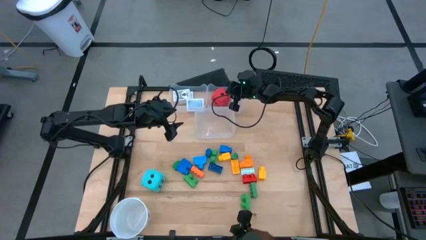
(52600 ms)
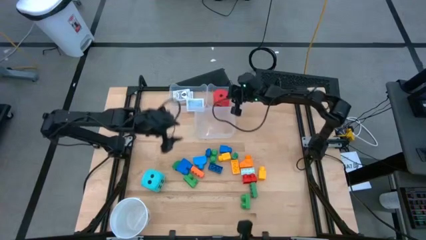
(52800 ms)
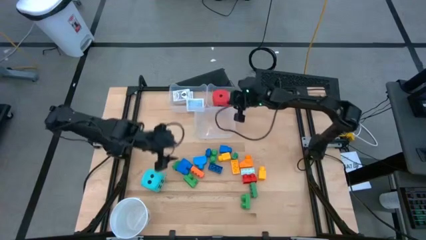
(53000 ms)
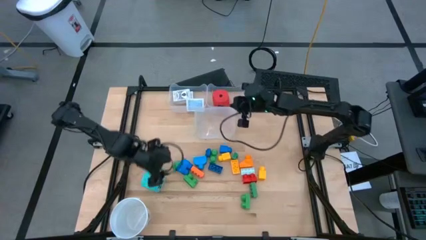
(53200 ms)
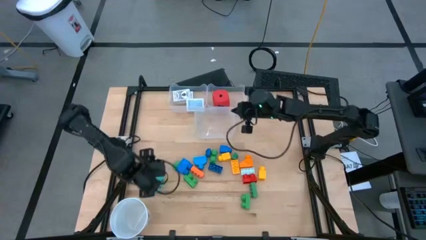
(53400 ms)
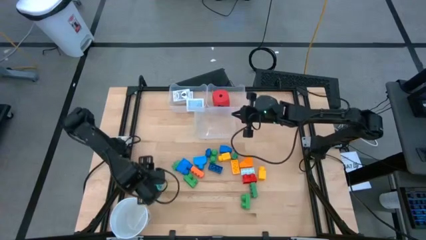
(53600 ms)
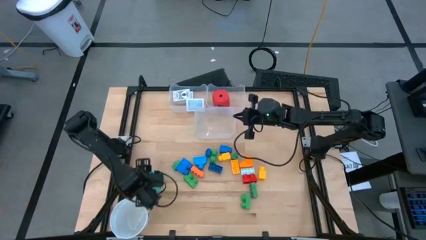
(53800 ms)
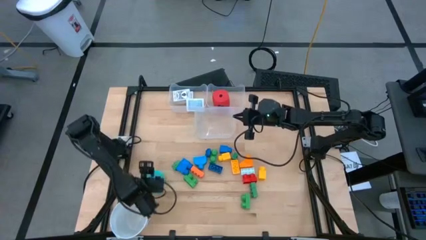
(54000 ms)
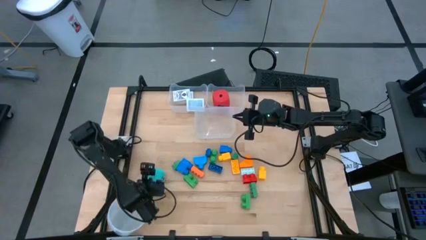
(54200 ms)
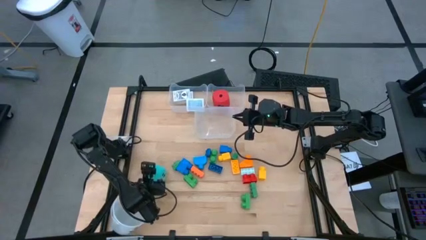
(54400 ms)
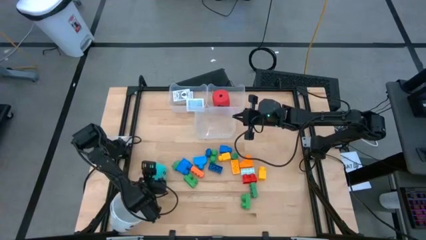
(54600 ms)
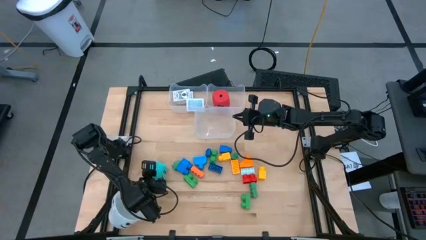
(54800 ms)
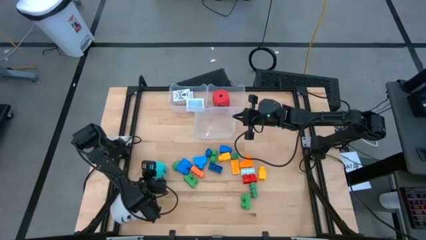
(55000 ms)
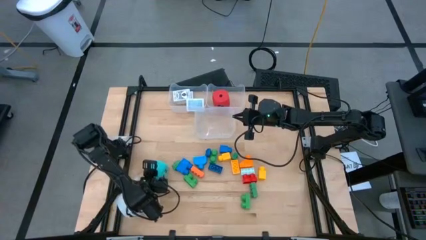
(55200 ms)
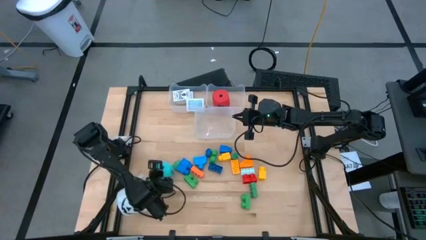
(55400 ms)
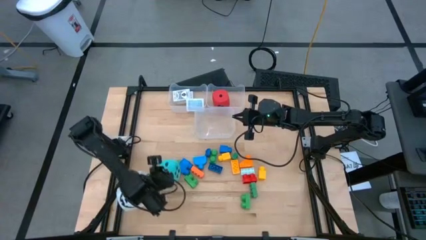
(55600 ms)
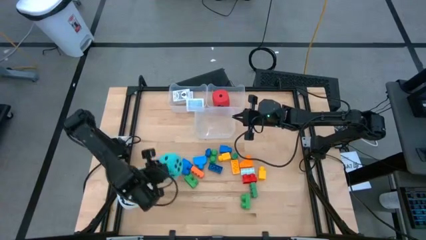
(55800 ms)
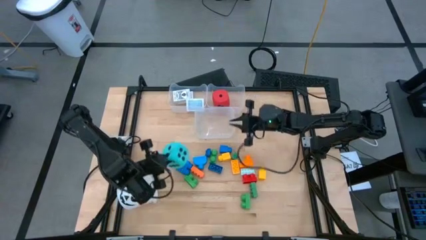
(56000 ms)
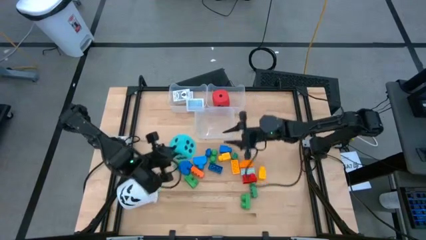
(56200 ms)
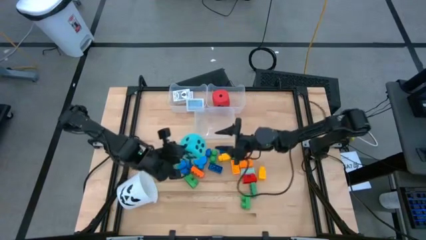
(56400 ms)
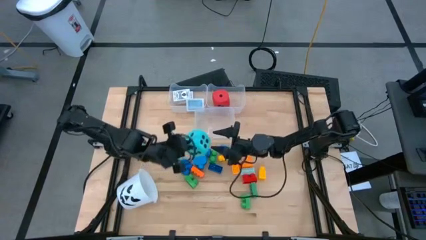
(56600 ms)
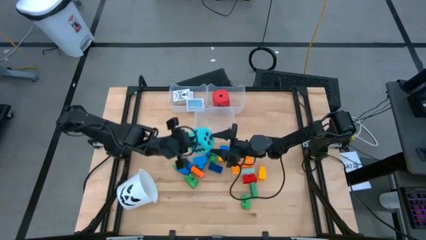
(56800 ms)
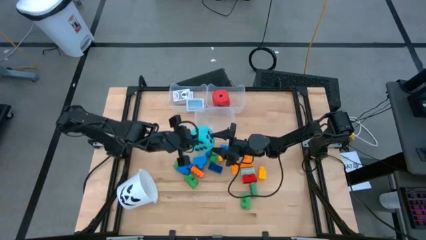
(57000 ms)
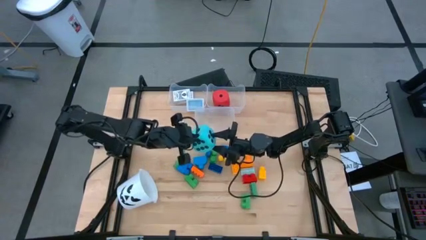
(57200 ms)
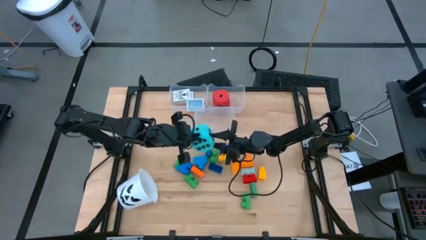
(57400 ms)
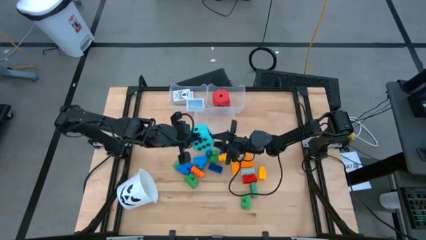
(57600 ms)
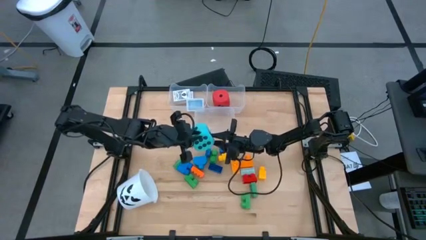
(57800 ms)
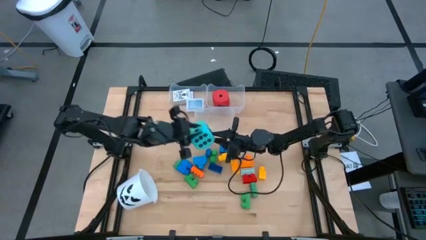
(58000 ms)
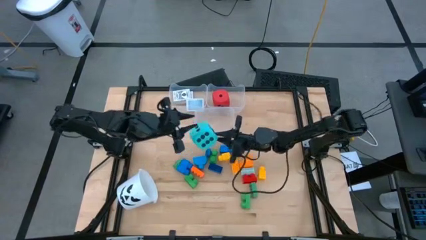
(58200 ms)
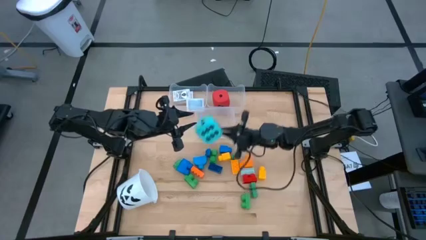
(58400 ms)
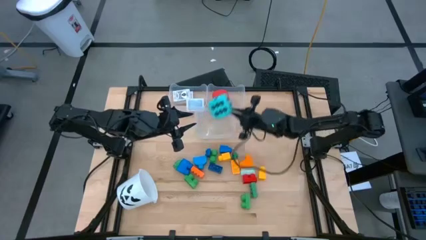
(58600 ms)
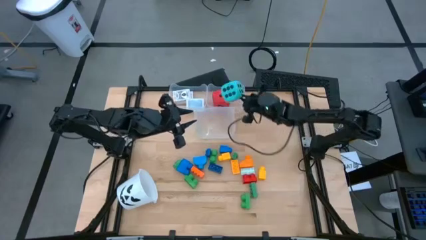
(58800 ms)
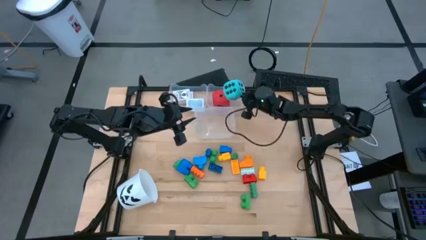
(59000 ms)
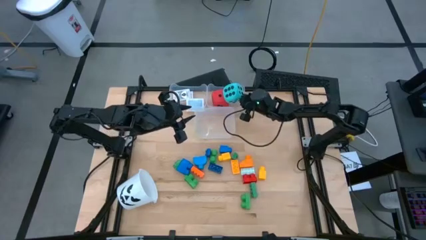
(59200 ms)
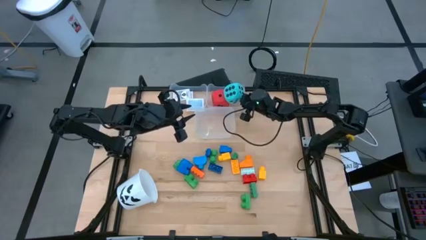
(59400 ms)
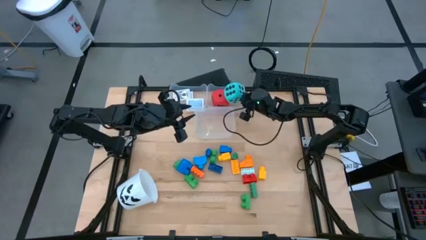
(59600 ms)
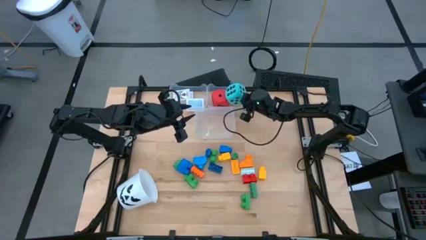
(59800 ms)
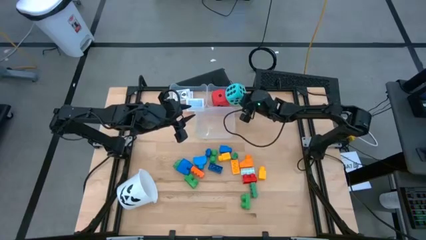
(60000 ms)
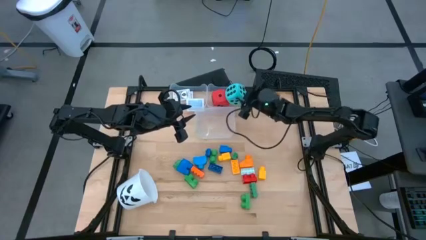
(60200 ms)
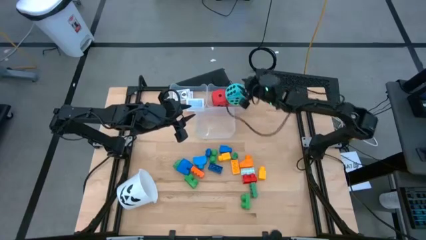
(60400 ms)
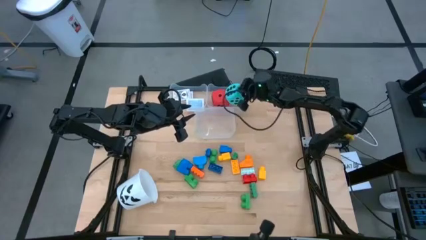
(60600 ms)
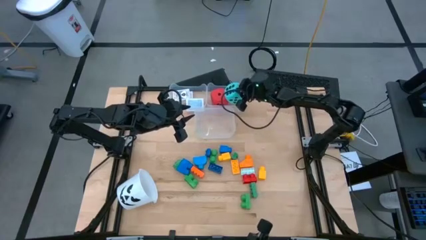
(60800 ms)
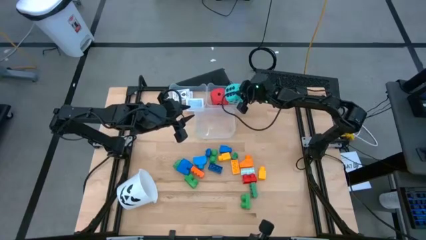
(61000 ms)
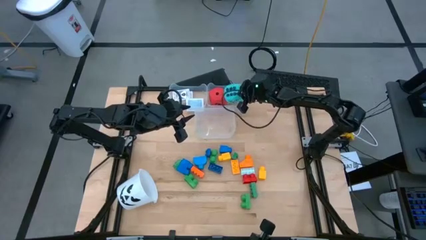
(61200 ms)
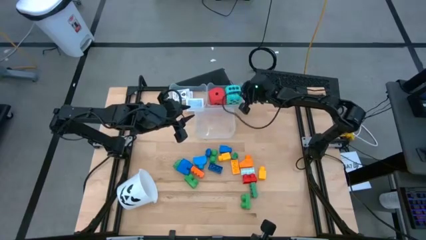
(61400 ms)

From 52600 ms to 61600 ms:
Task: Pick & Place Toys
Put the light blue dice into the top right transparent bin

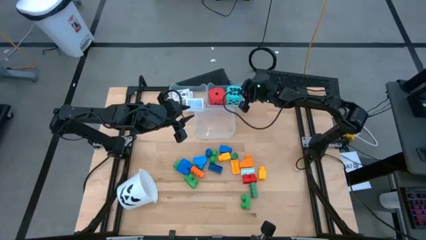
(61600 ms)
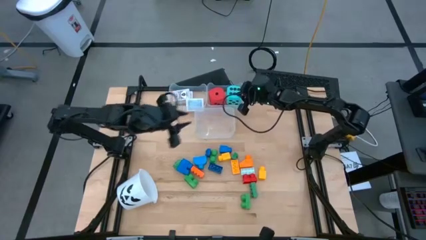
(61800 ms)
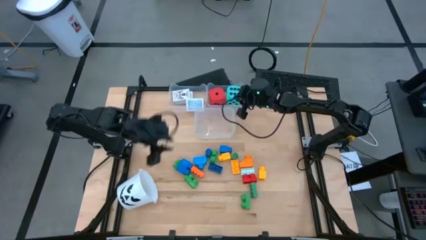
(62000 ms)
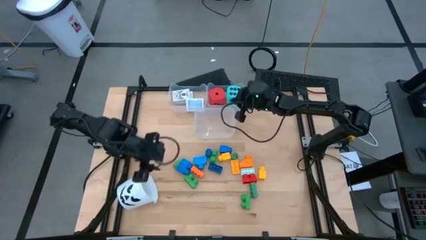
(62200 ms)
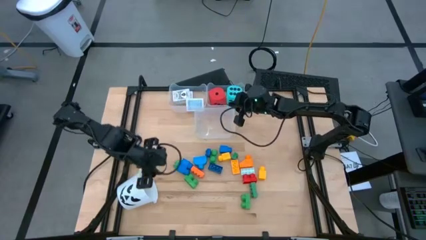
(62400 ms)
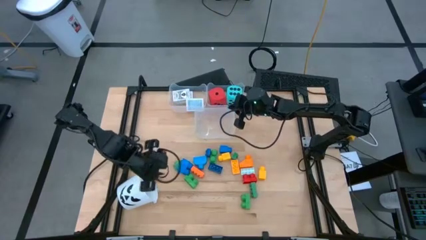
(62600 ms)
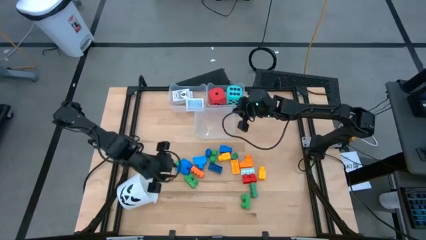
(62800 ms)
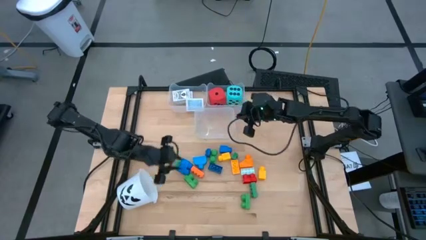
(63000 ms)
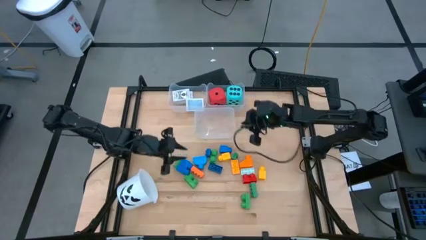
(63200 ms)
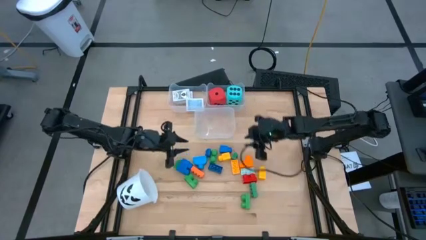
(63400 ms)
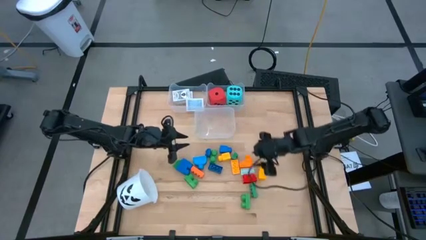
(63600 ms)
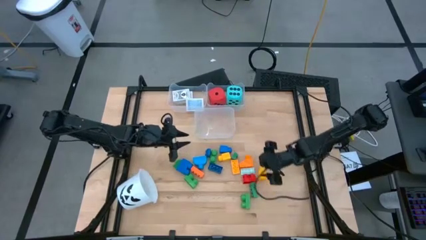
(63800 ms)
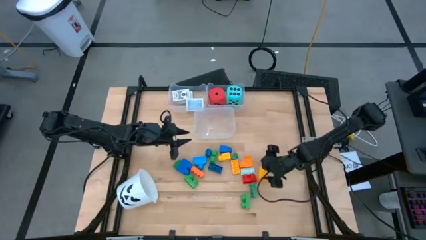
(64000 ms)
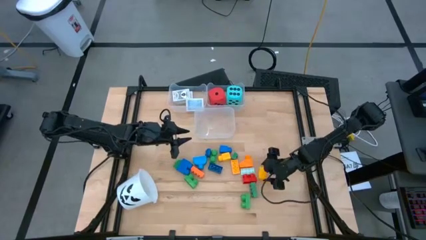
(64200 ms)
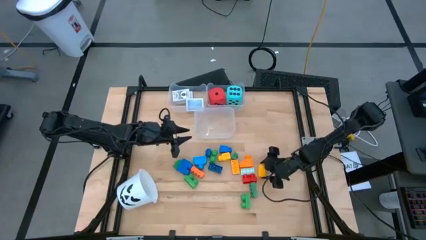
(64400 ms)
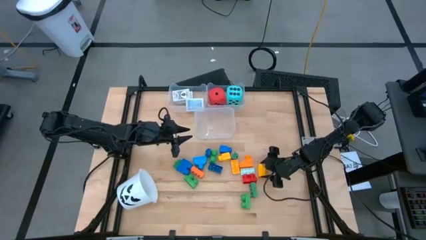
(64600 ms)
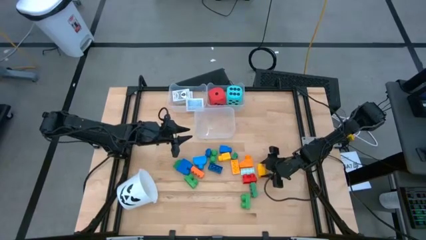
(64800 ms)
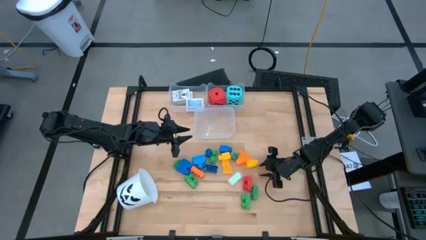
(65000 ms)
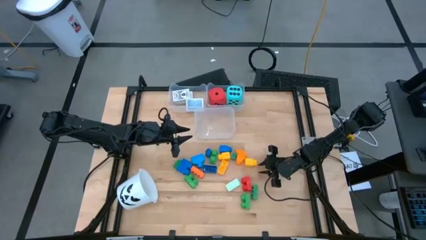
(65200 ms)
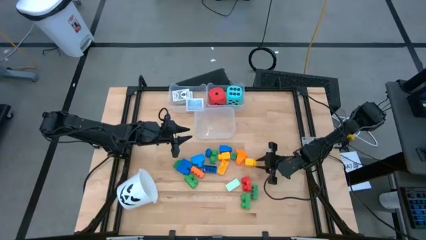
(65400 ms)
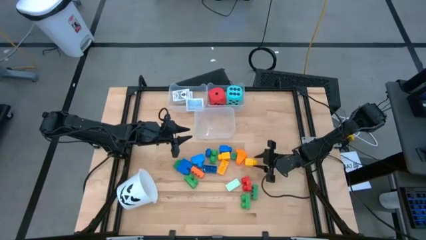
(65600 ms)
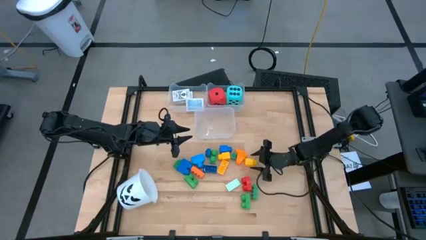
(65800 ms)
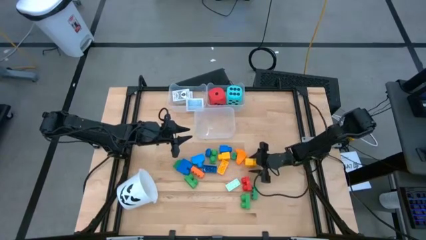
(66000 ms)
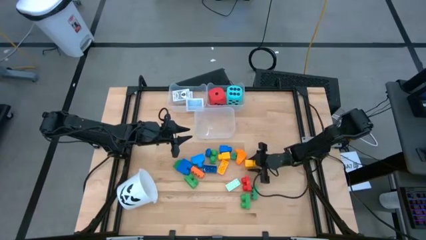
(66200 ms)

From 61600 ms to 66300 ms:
Put the right yellow game piece into the bottom transparent bin

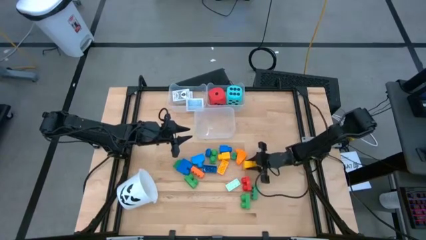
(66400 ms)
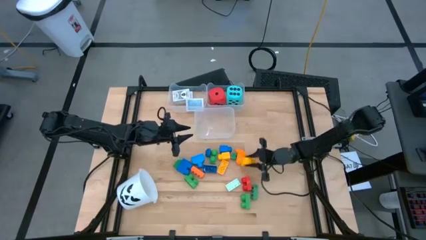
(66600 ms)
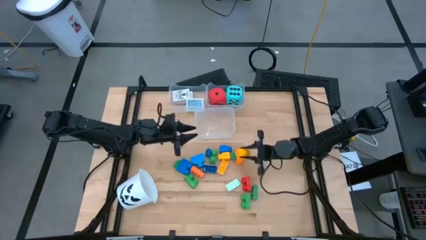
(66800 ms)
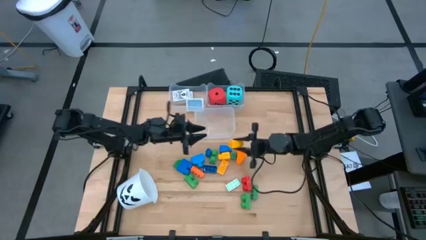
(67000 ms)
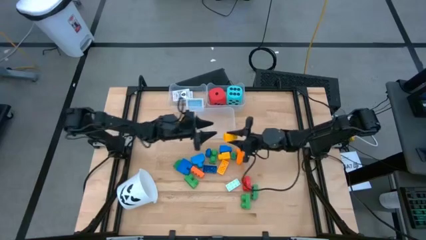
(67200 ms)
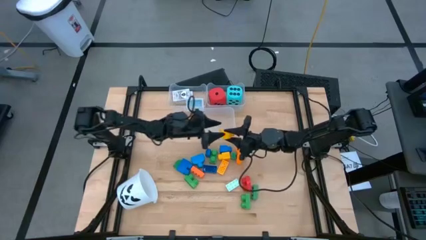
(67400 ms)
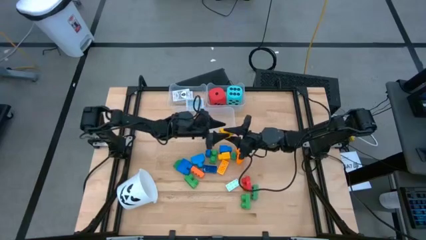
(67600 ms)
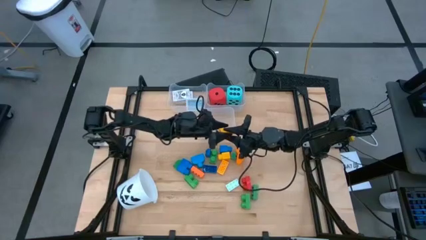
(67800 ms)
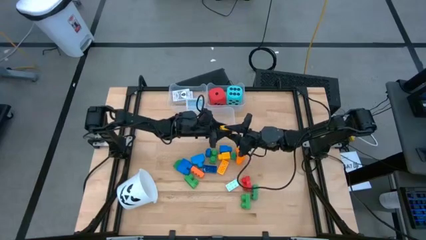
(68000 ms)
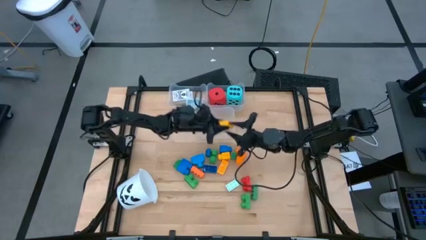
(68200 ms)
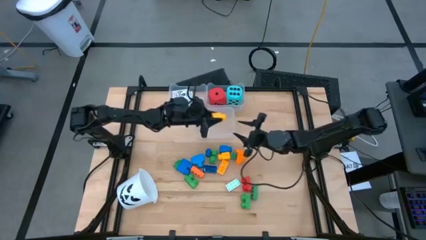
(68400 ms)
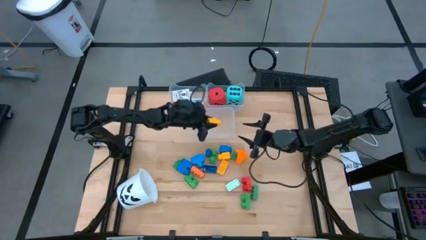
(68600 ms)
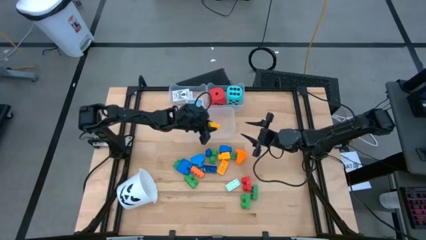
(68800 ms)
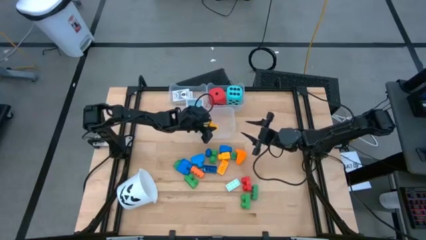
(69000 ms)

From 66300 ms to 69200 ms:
Put the right yellow game piece into the bottom transparent bin
